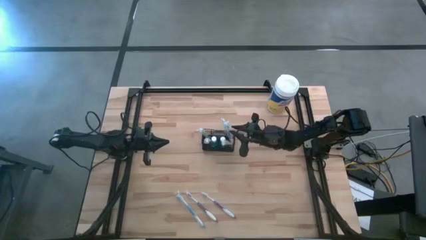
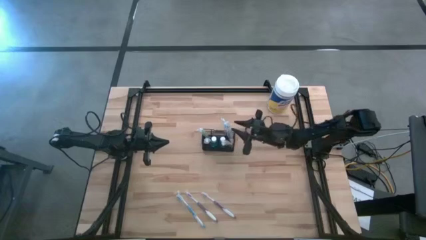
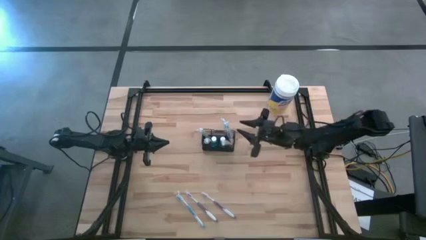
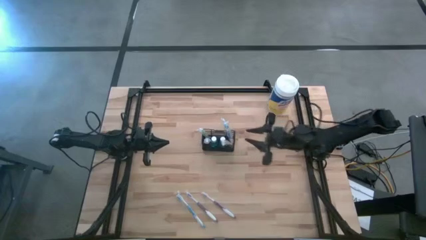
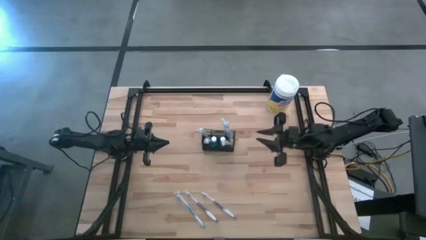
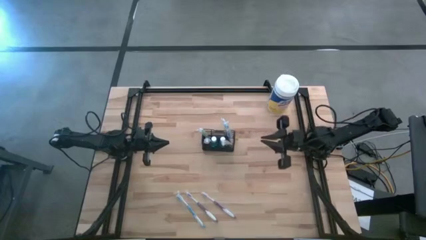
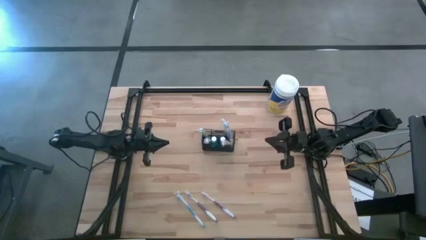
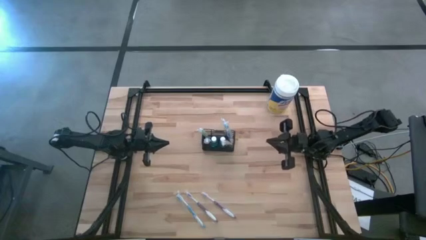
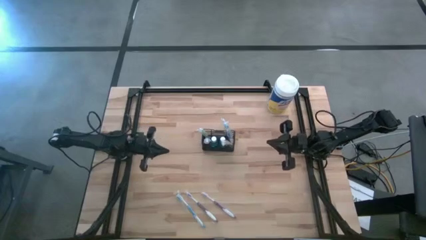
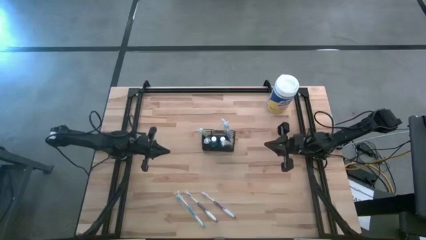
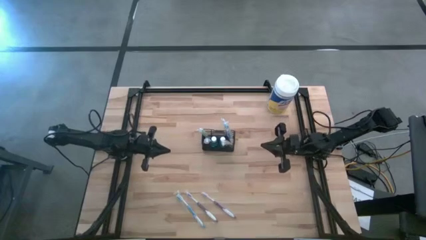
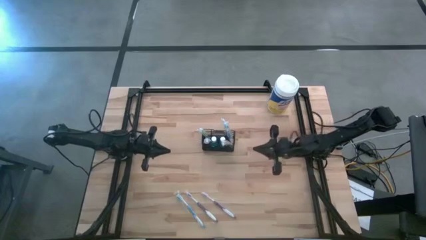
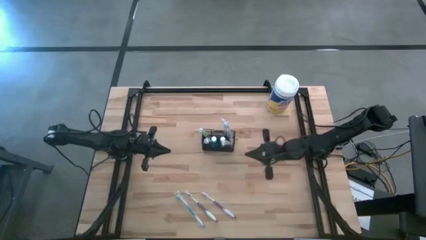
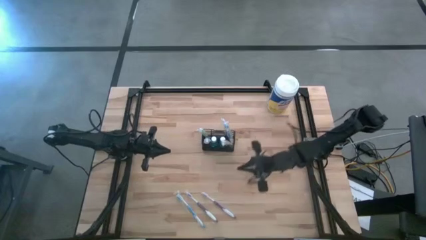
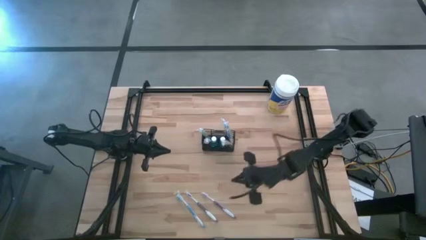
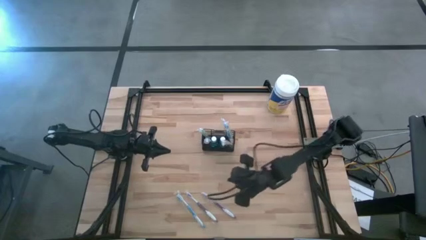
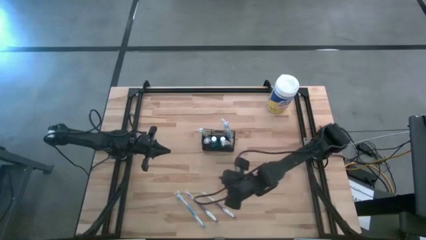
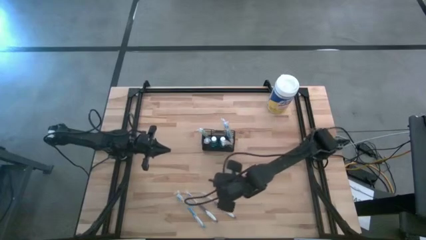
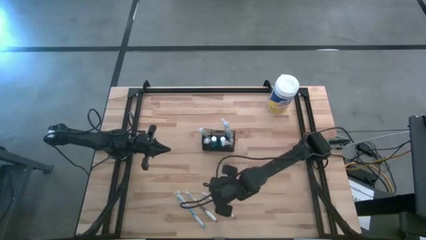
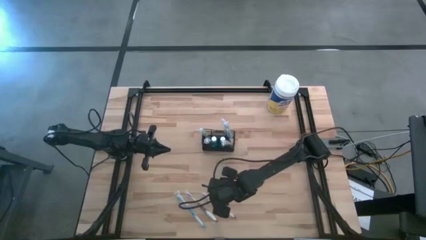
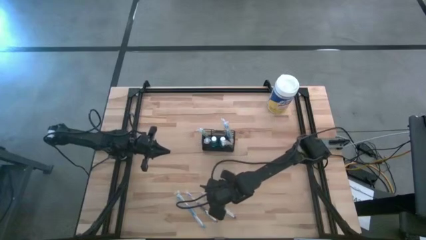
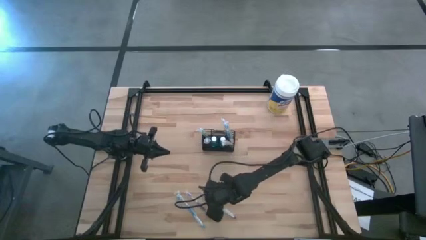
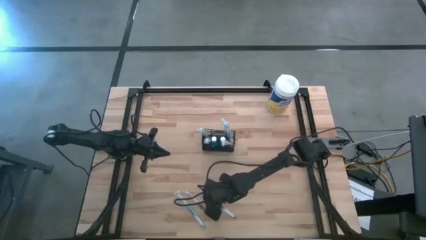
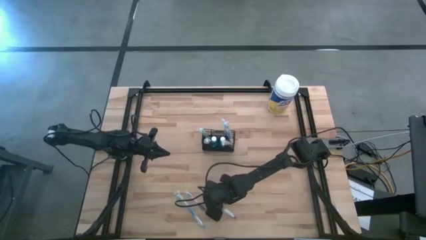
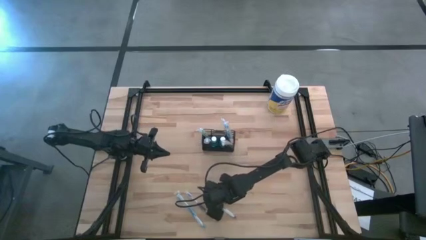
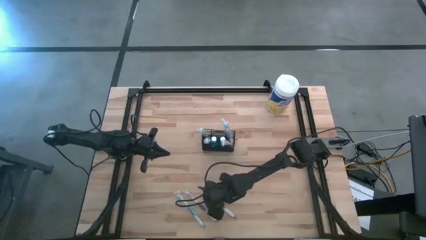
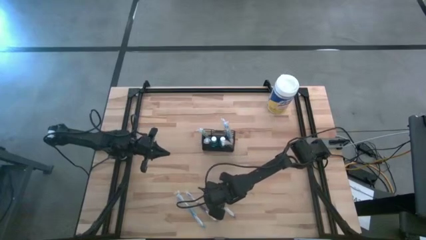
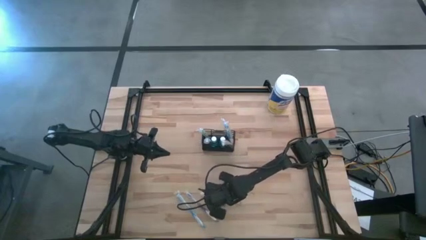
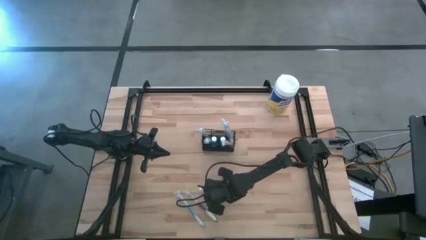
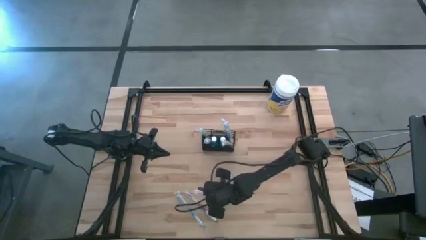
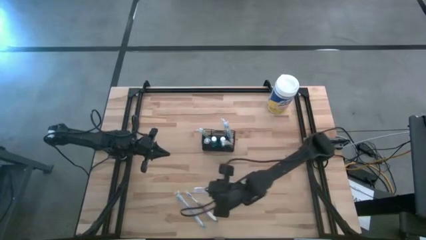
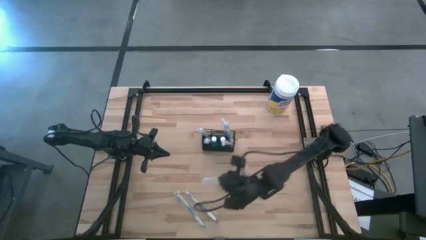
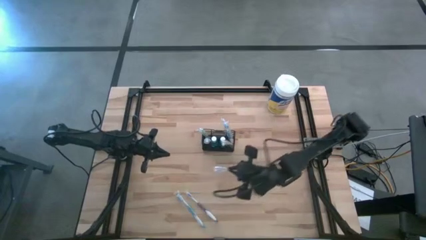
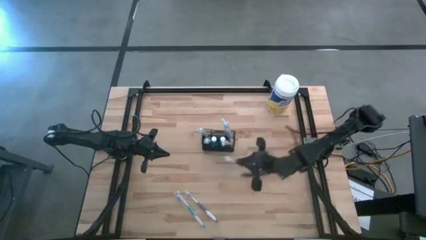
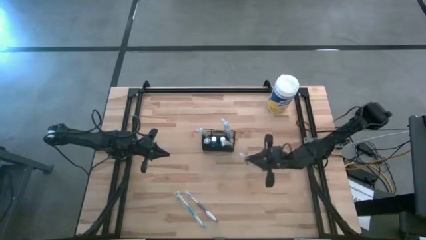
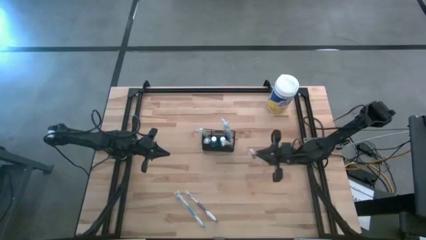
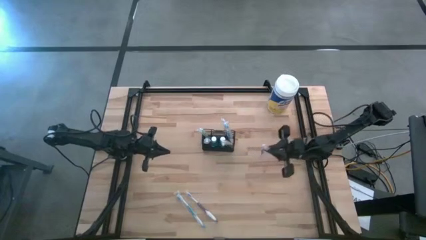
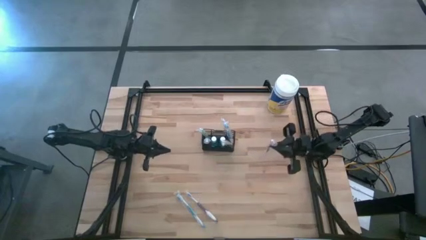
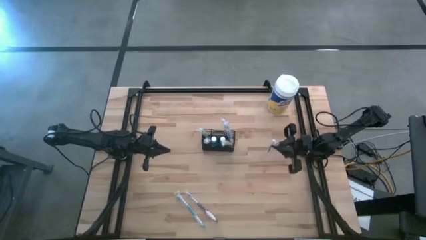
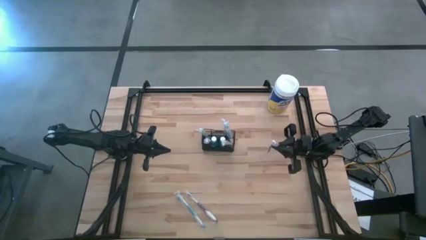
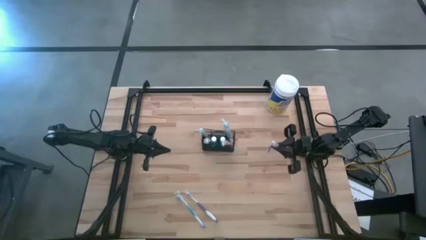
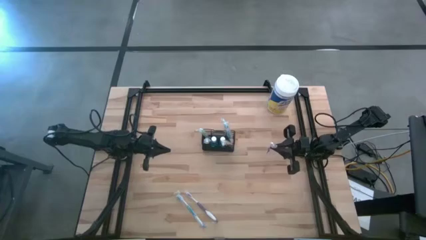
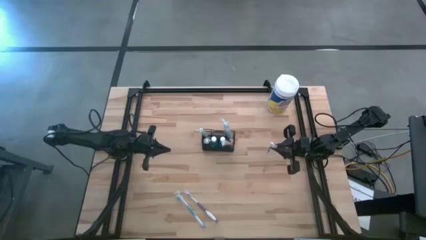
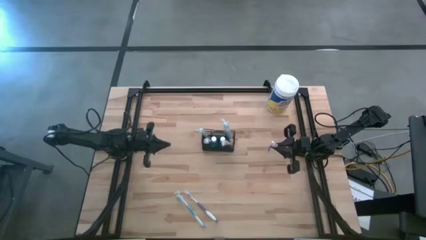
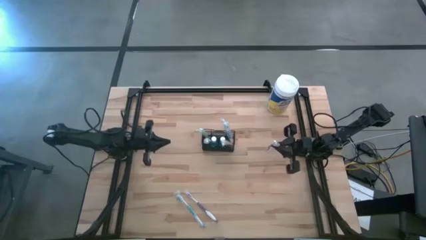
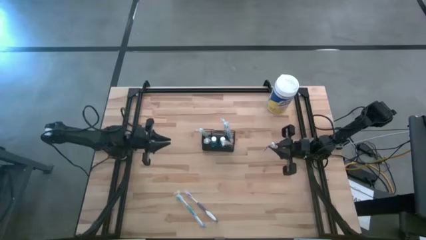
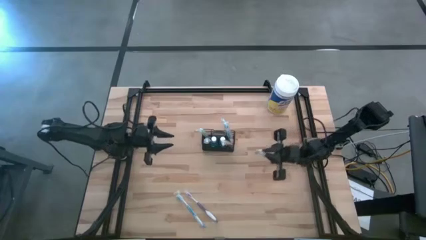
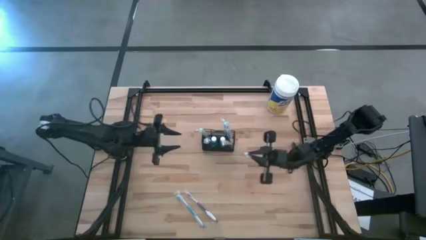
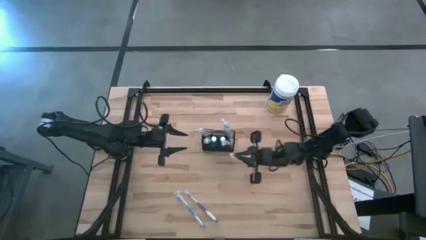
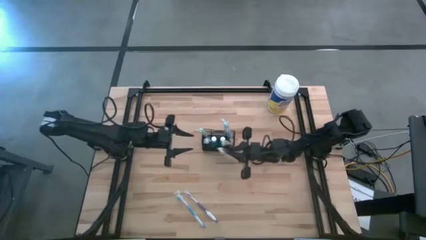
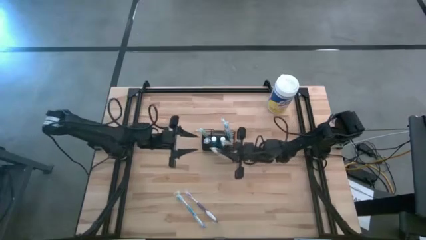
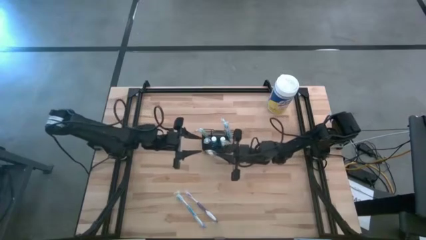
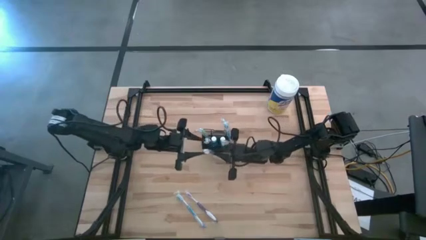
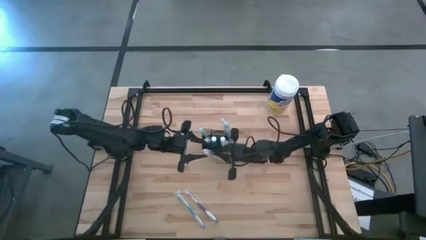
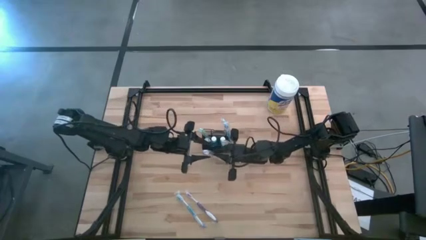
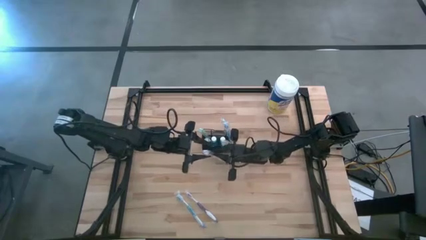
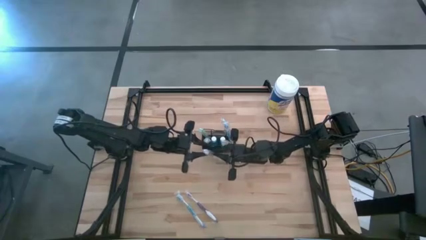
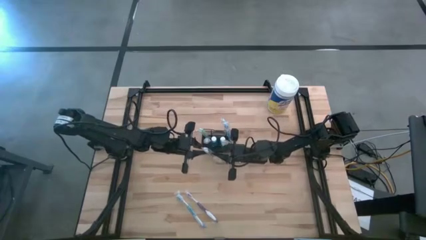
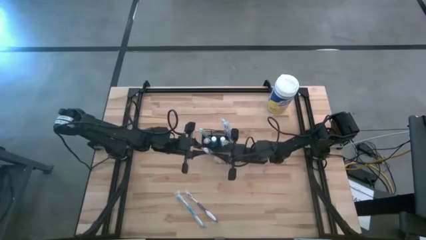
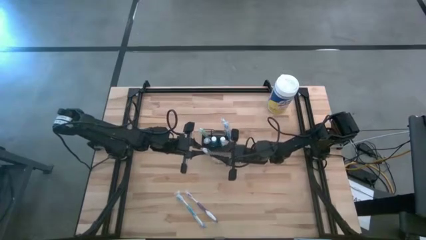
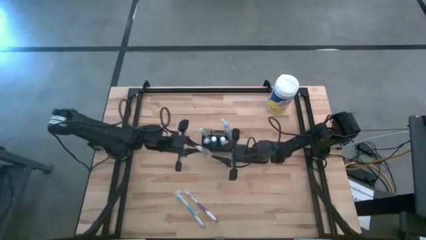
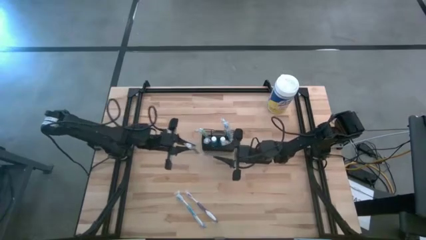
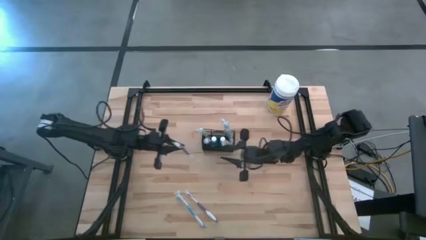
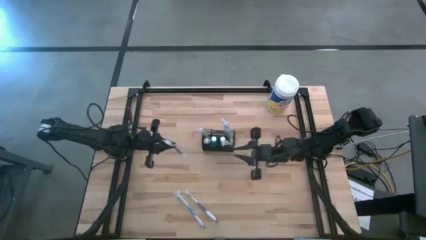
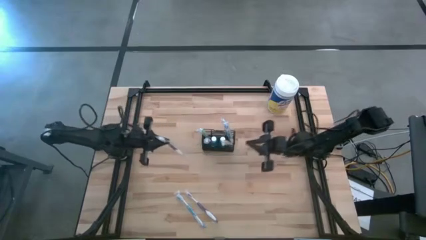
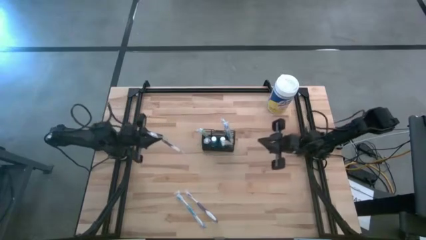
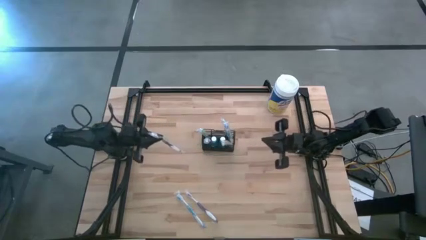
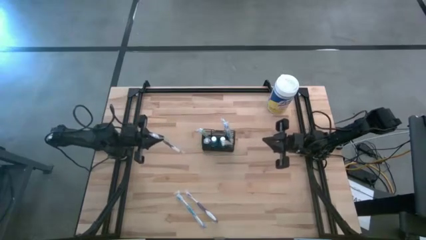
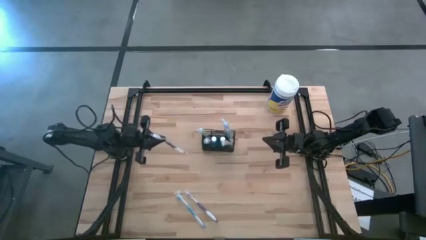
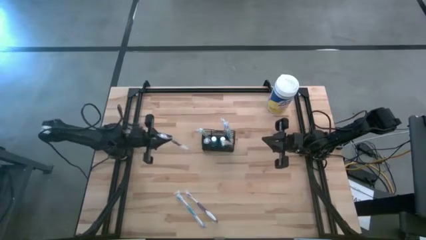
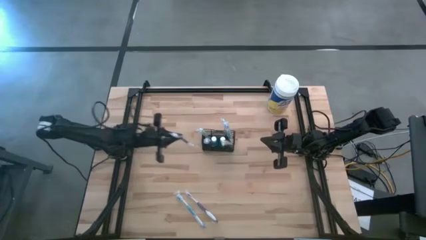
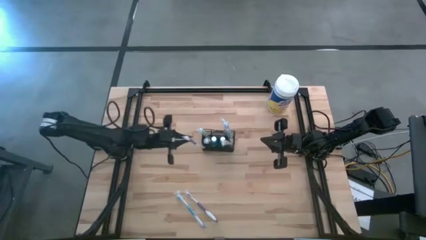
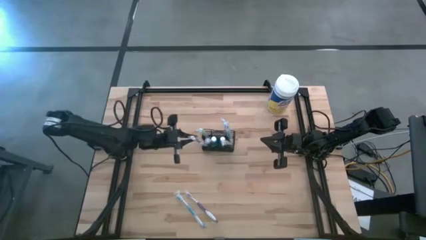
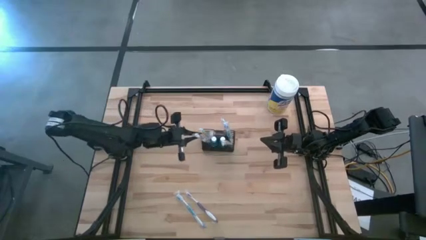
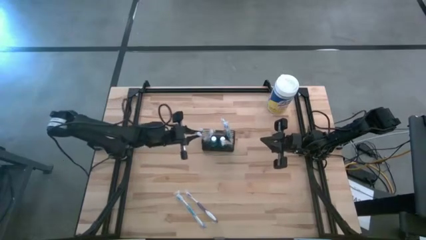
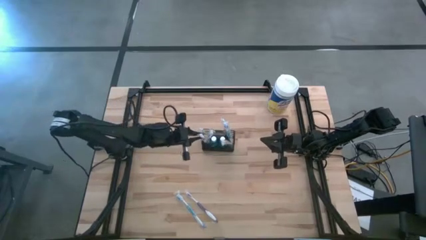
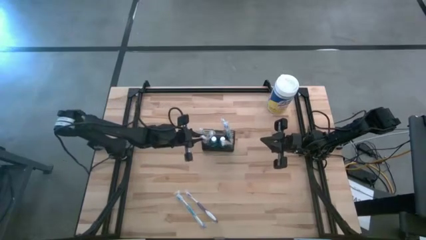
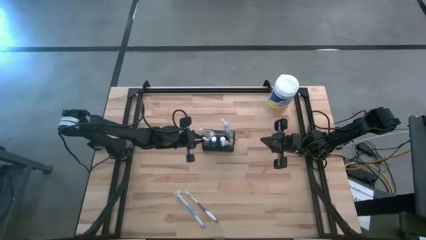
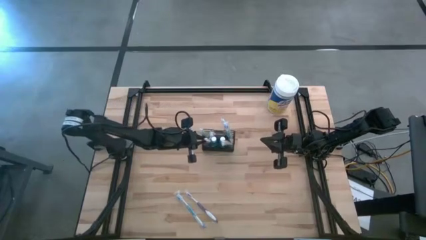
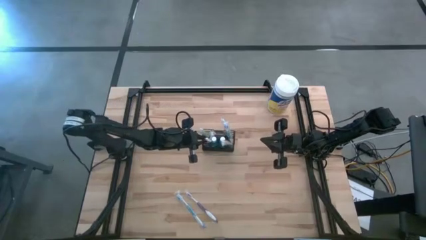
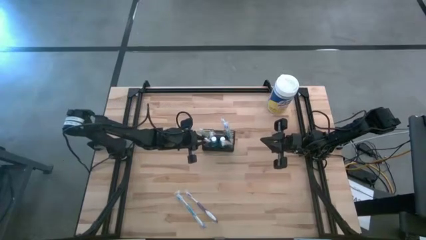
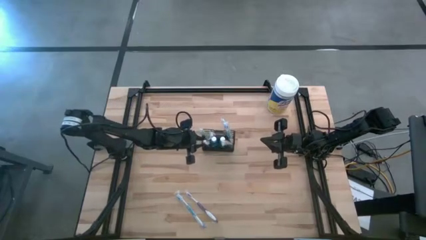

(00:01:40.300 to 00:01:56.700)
Task: Pick & Place toothbrushing station
Put the right purple toothbrush into the wire organizer

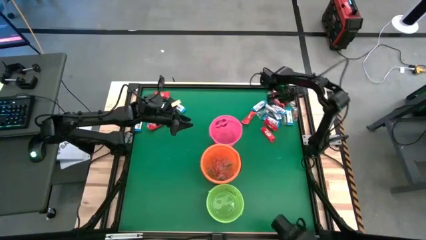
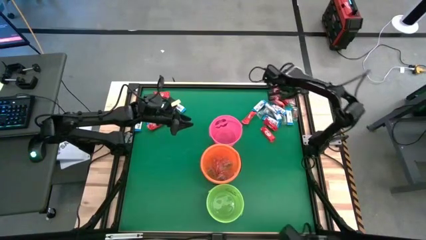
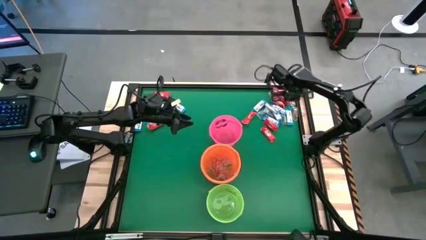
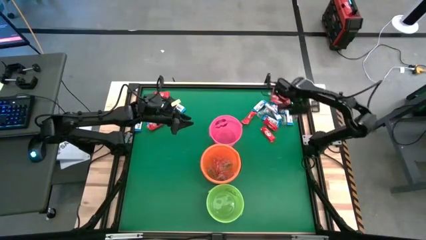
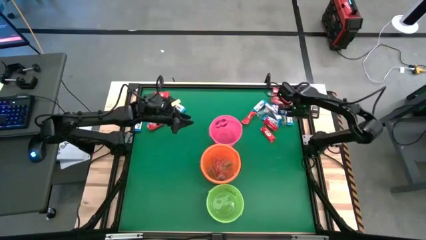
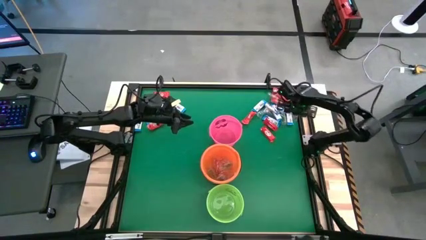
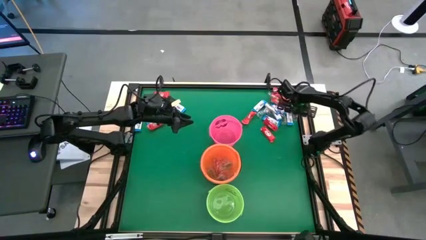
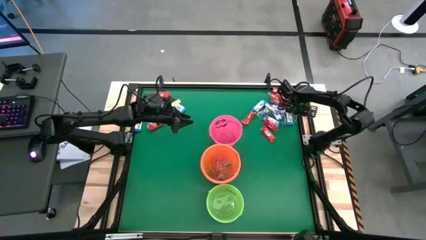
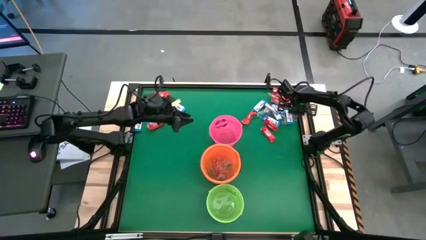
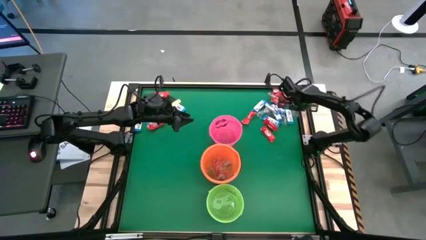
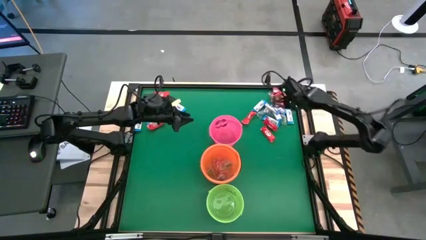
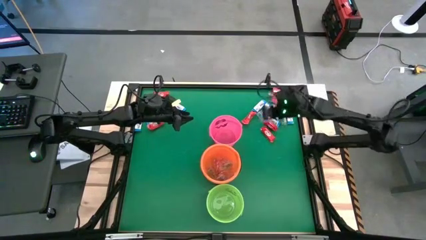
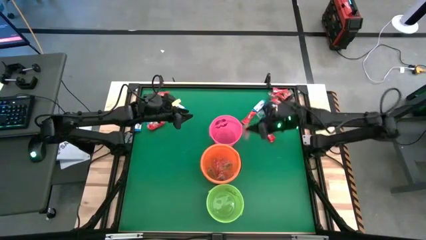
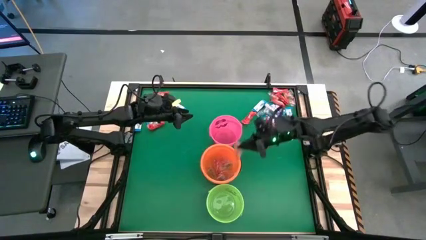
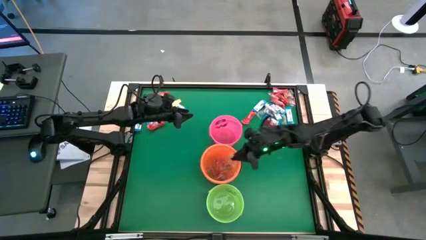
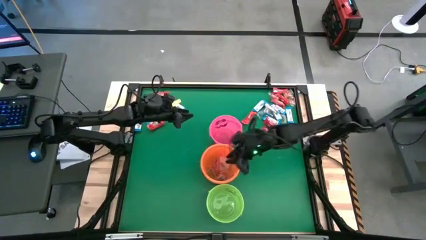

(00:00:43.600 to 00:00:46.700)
Task: Sort candy by brand, put in halloween buckets
Put the orange gummy into the orange bucket
